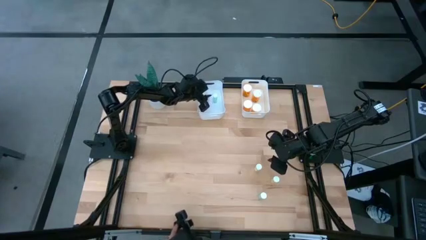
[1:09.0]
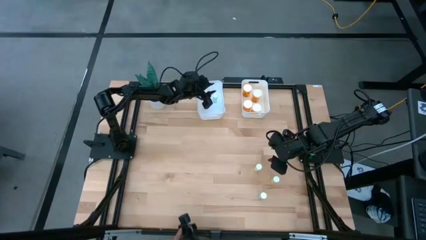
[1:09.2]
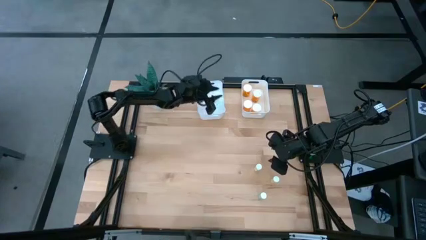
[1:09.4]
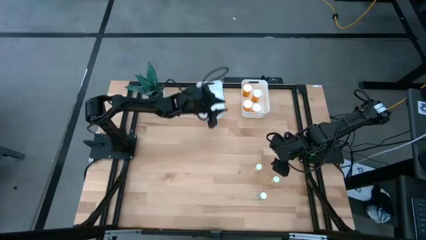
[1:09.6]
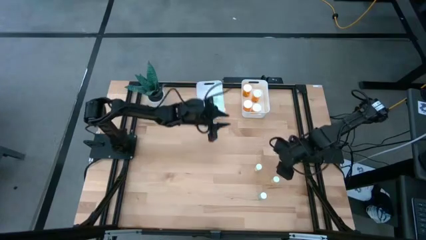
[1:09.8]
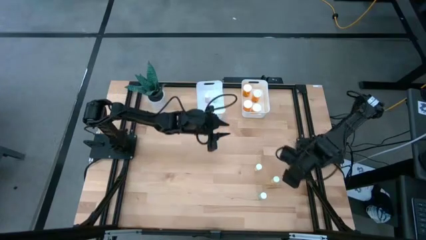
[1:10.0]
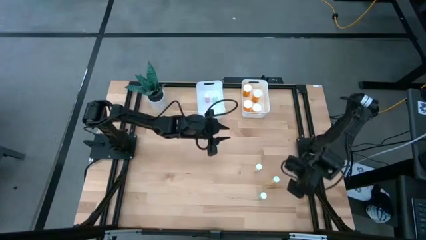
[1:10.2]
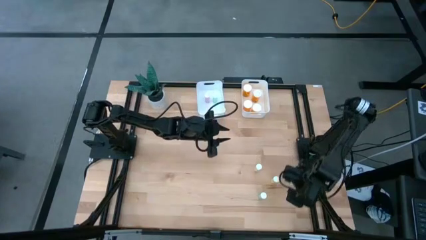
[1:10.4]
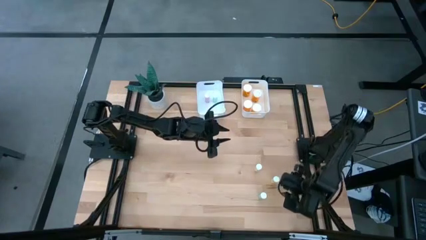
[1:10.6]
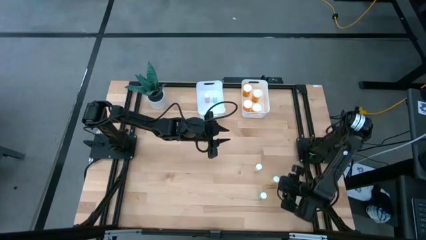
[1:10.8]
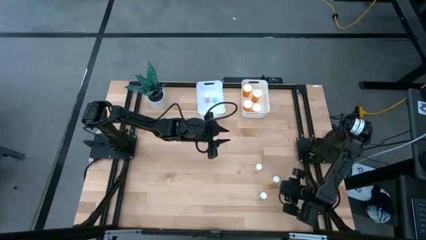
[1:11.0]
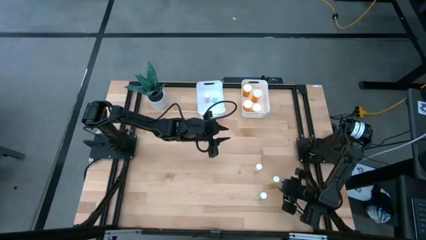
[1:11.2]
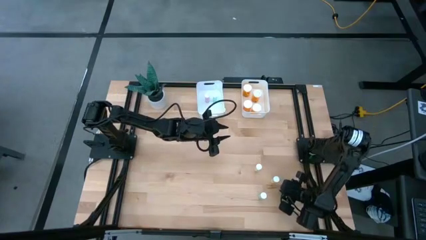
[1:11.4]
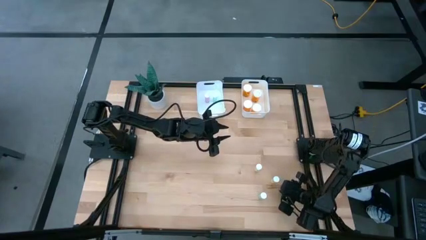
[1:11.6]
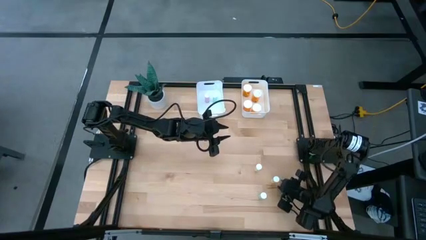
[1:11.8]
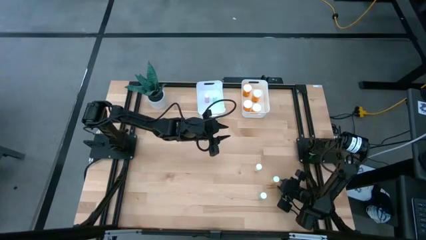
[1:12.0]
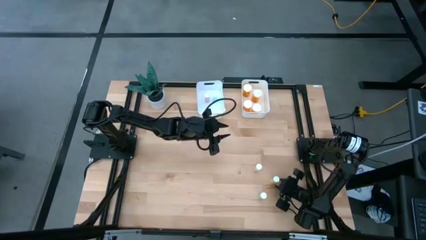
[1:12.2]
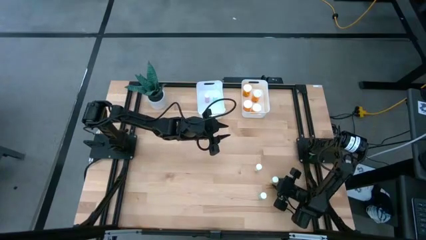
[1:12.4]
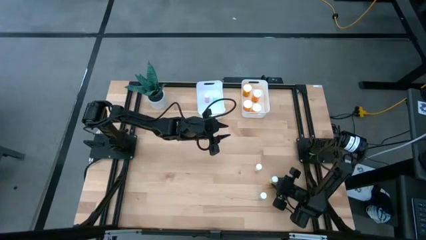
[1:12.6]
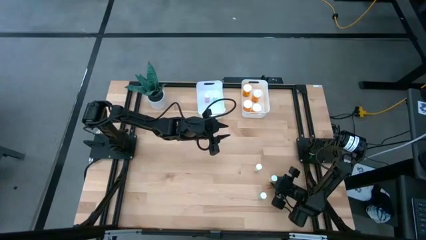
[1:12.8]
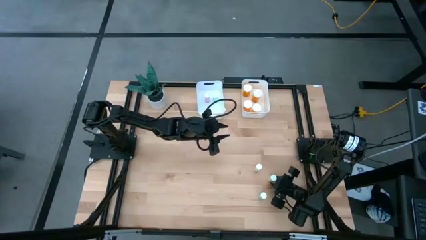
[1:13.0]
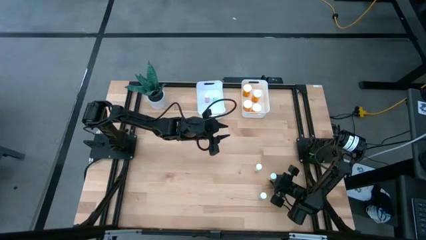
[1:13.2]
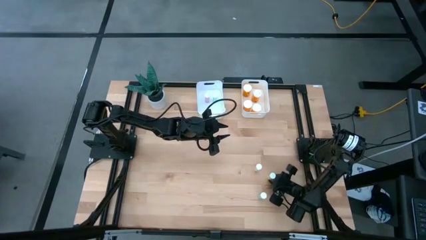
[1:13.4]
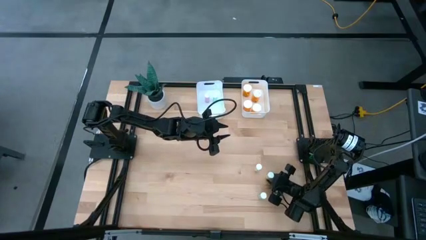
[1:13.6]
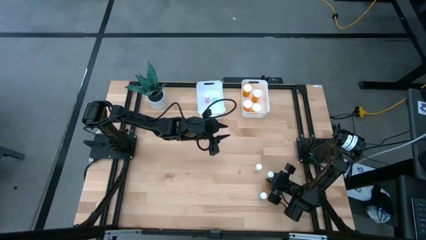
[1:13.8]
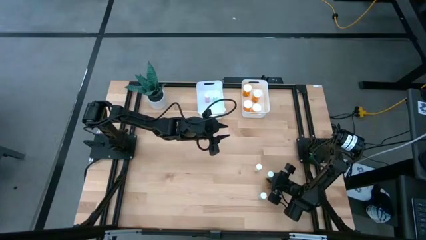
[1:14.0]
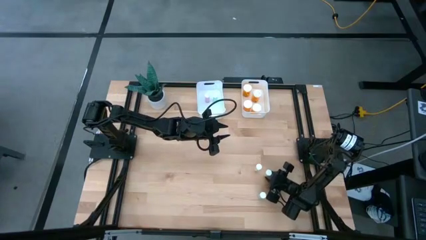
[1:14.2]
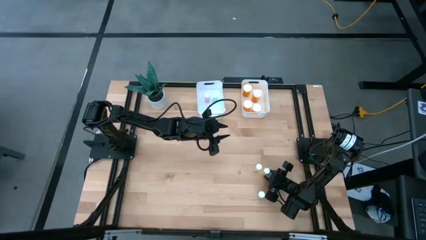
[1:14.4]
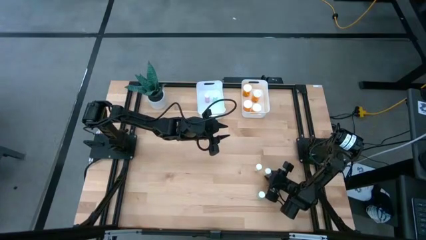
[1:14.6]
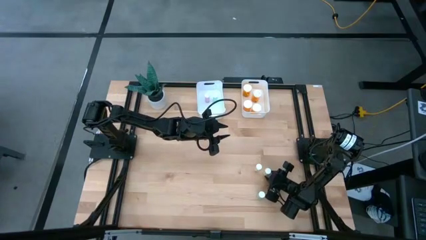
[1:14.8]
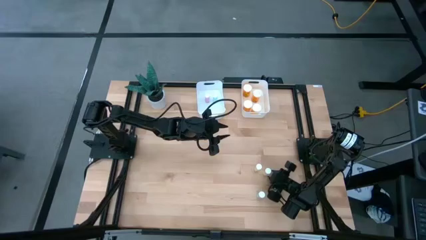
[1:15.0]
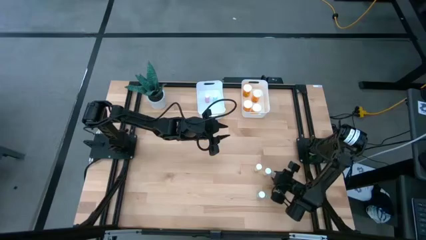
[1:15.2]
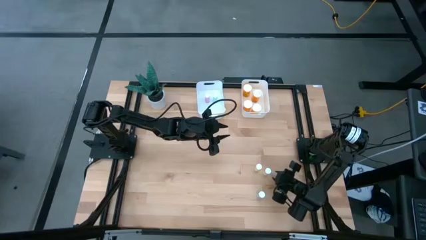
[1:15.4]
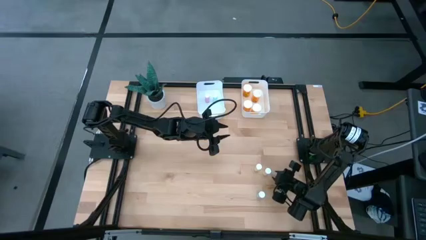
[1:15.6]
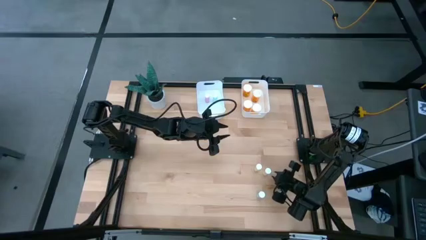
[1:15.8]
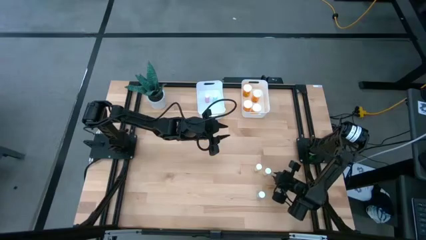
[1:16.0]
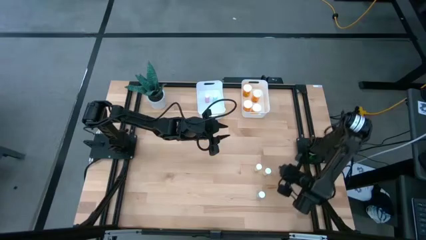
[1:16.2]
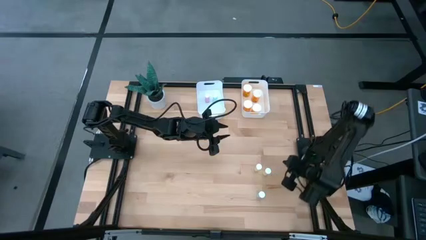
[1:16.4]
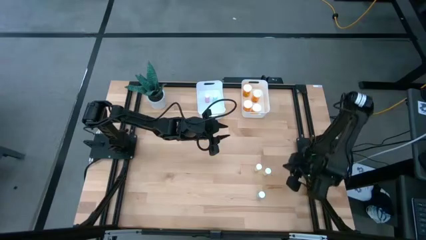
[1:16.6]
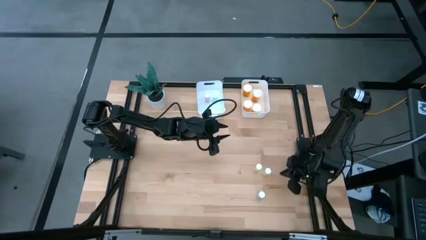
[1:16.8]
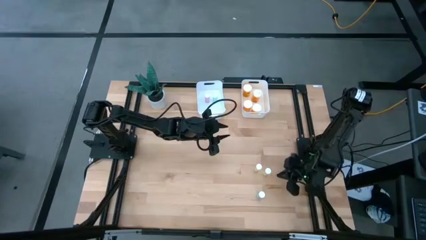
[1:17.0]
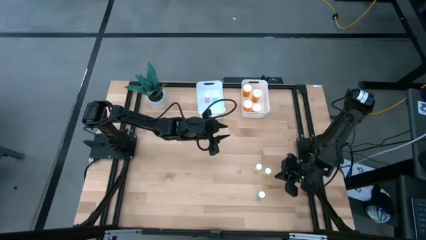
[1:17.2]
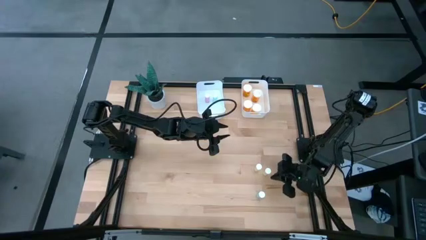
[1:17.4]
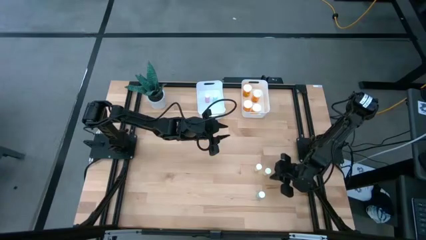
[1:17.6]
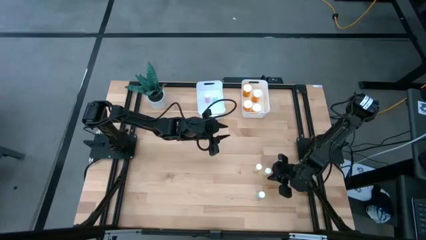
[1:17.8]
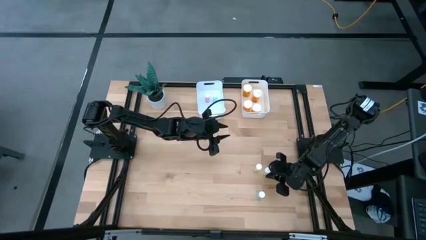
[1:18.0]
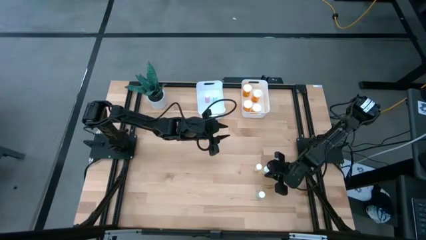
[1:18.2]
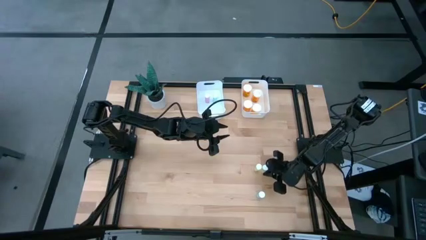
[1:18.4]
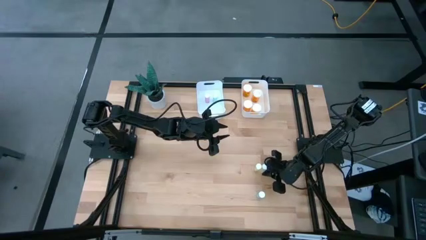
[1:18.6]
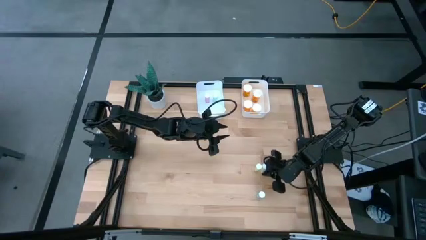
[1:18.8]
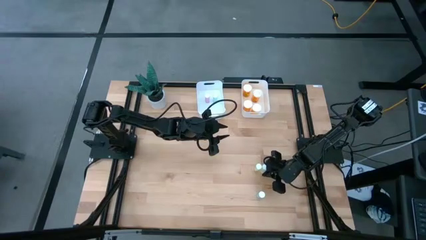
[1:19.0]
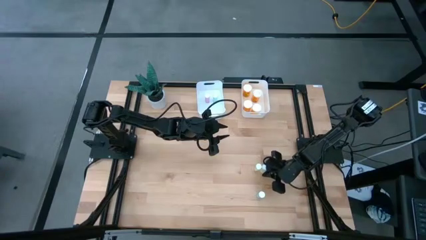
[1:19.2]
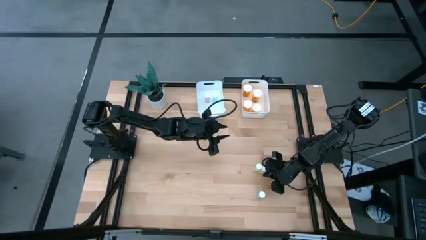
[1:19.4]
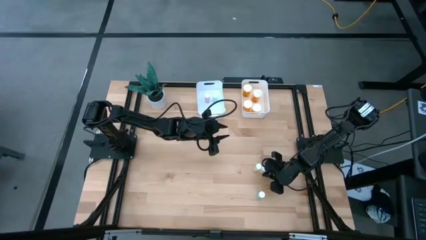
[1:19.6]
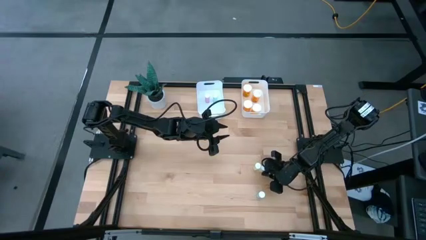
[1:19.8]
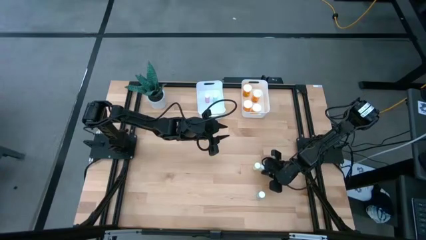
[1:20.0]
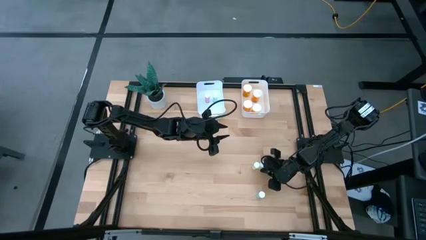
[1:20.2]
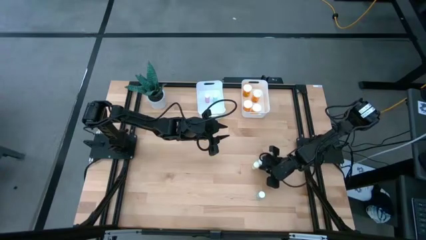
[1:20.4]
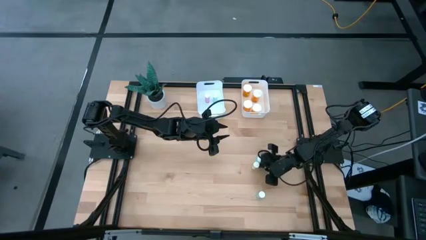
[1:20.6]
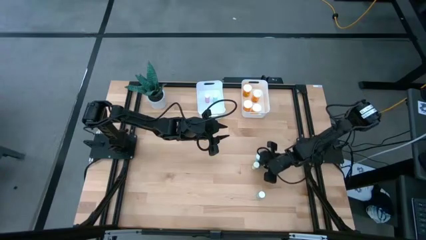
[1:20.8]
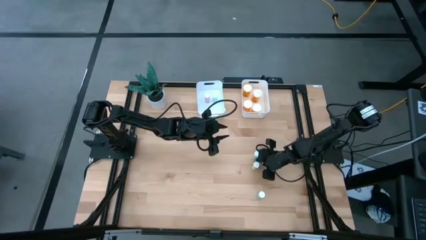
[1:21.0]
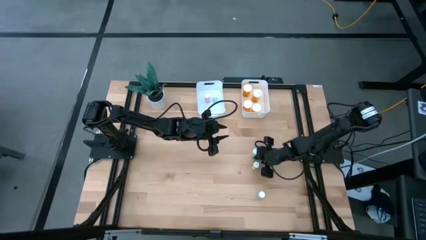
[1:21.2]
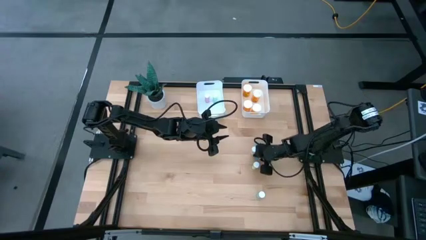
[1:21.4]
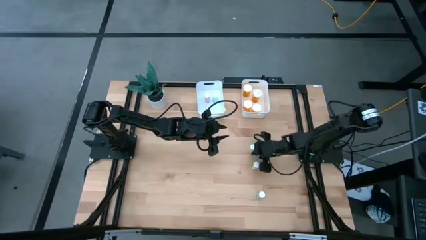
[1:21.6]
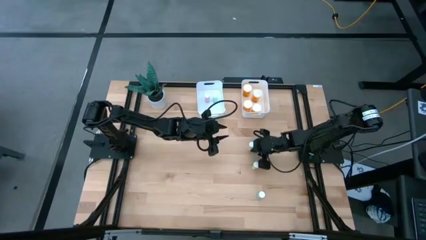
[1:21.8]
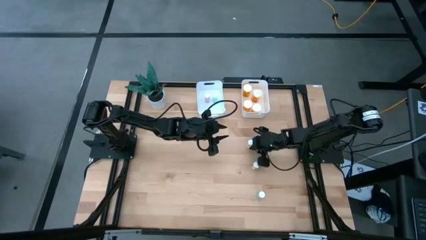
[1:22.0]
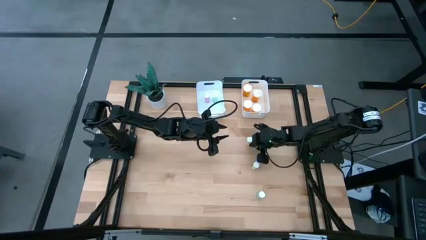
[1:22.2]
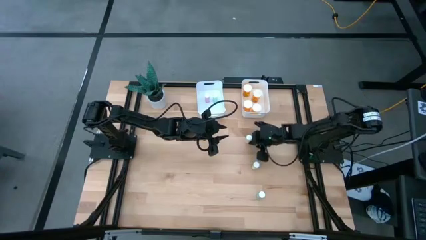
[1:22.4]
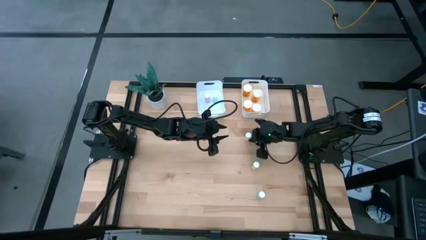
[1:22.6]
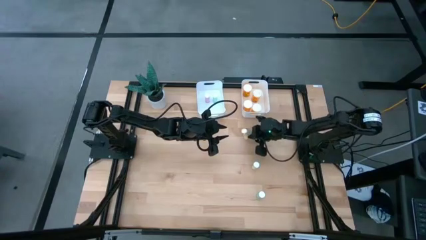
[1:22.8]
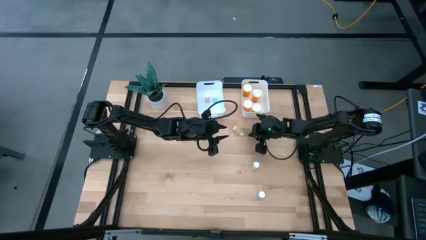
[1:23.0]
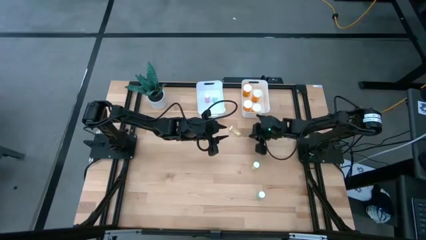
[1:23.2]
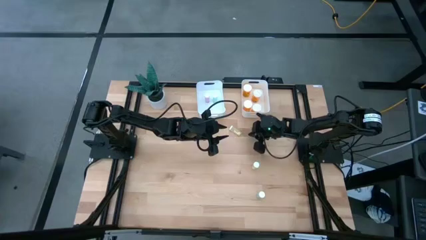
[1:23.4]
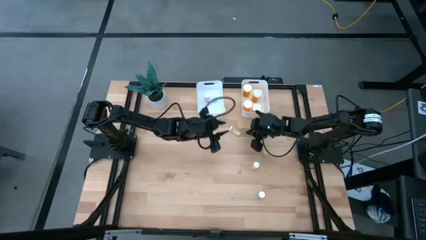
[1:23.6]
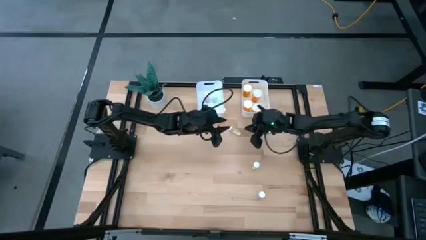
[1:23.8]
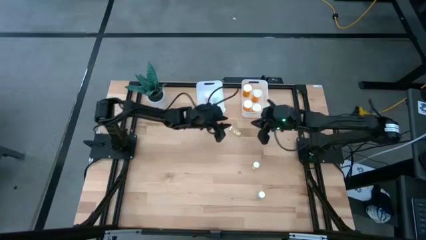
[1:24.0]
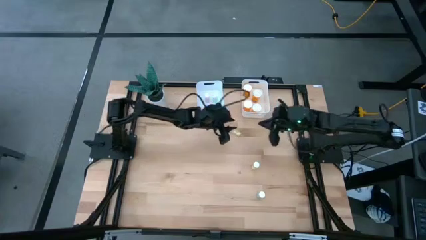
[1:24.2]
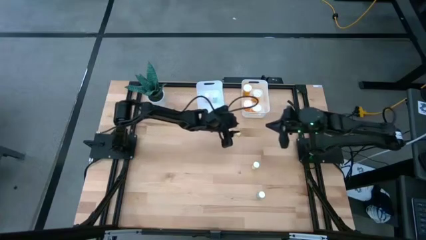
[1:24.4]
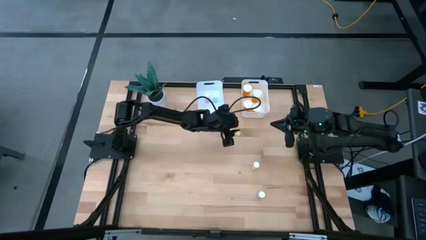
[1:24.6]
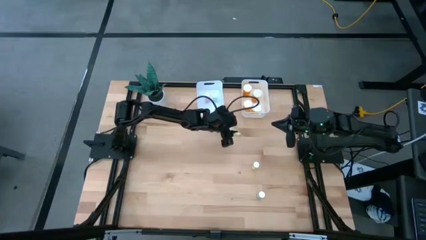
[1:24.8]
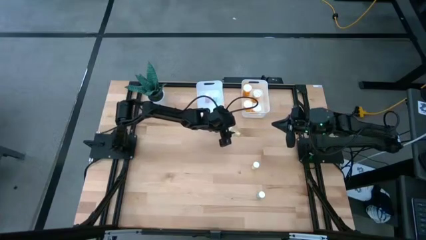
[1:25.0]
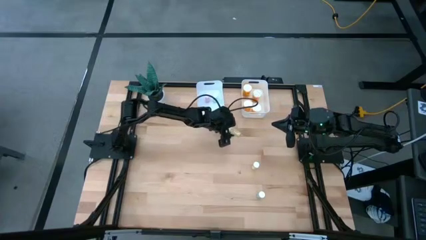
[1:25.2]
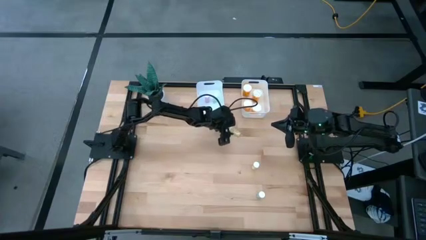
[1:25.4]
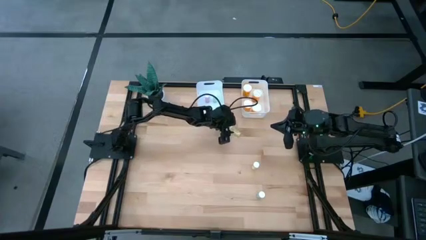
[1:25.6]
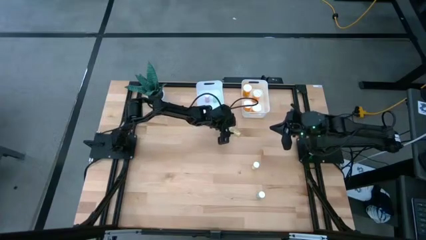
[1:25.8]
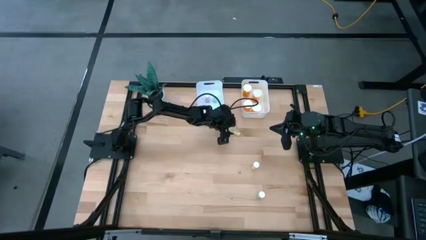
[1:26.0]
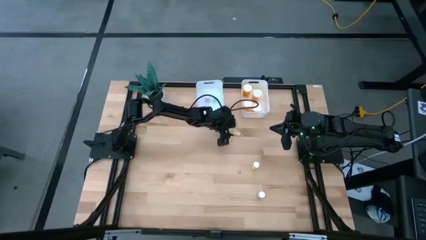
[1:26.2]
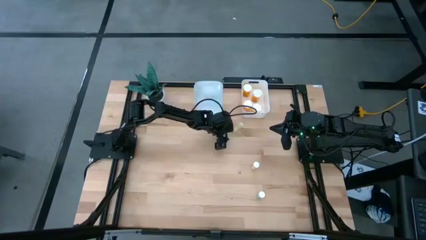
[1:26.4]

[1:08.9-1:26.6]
Task: Pick and place medicine bottles into bin by pill shape (circle, oval)
Put the small yellow tablet bottle into the left white bin
